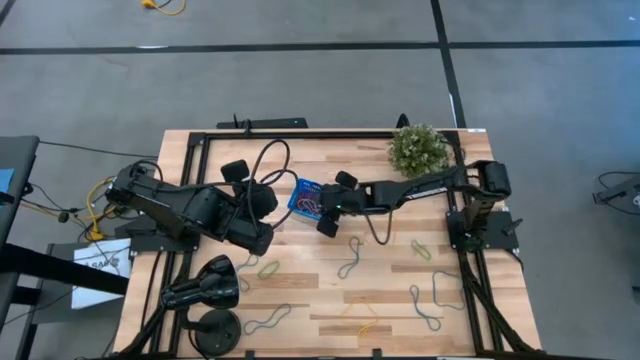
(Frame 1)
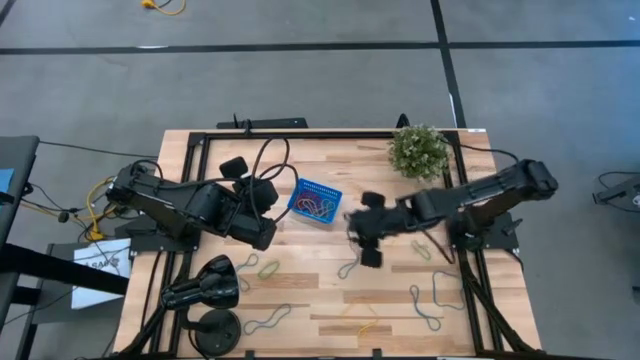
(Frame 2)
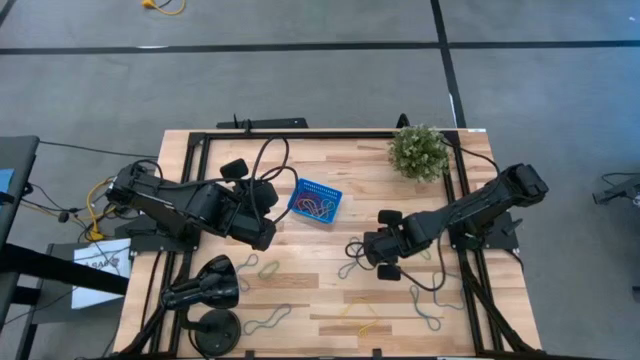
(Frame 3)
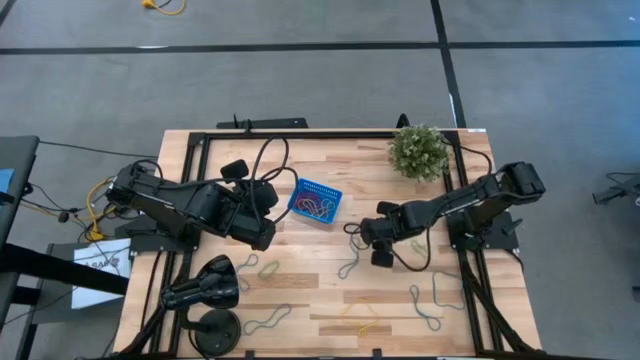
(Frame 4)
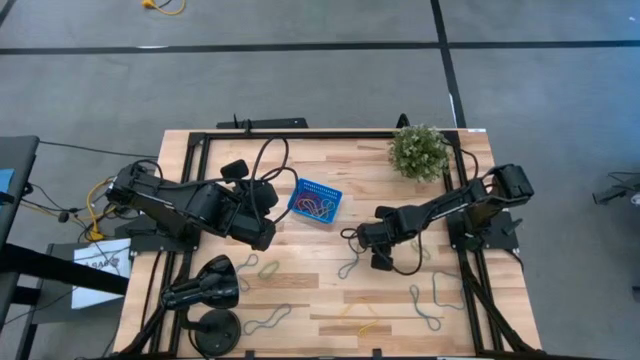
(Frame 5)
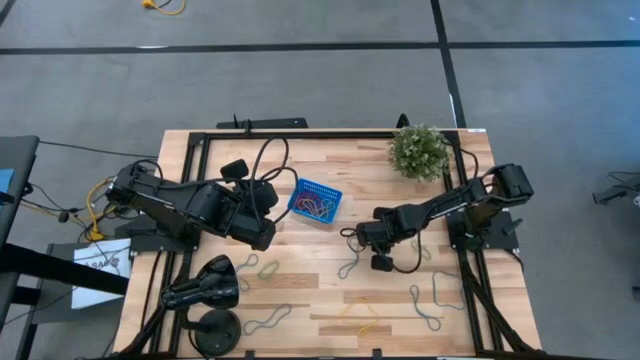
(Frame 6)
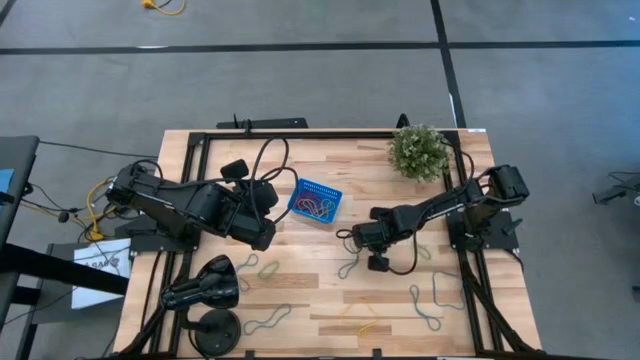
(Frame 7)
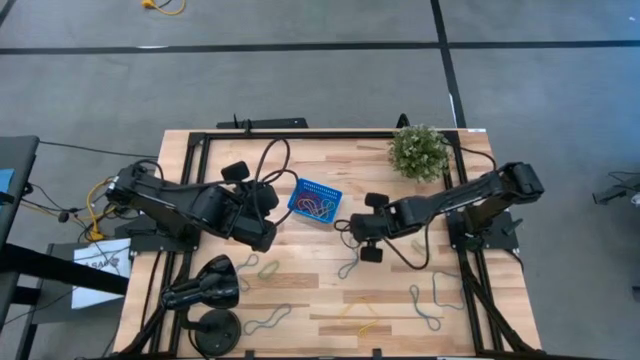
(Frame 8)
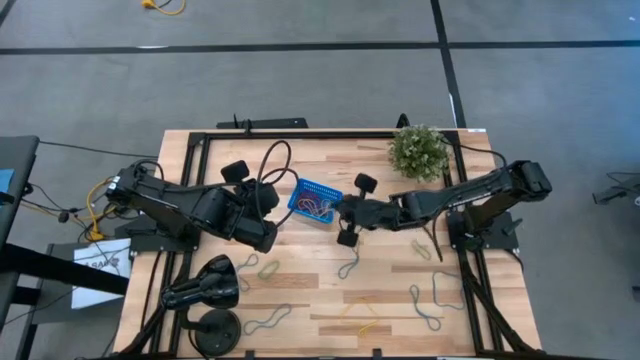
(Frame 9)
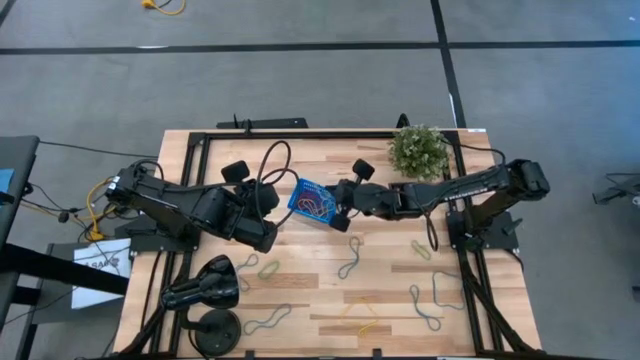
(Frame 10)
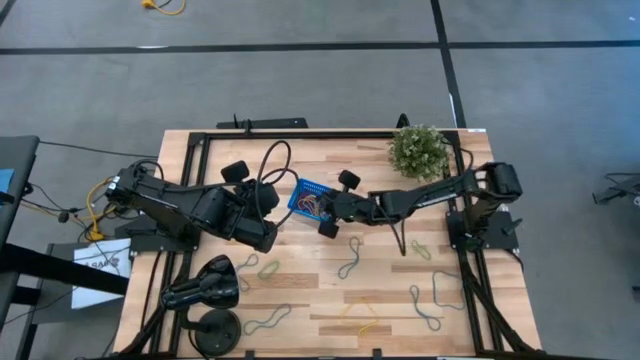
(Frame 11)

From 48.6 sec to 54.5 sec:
Task: Pick and place items into bin
Put the yellow rubber band into the blue bin

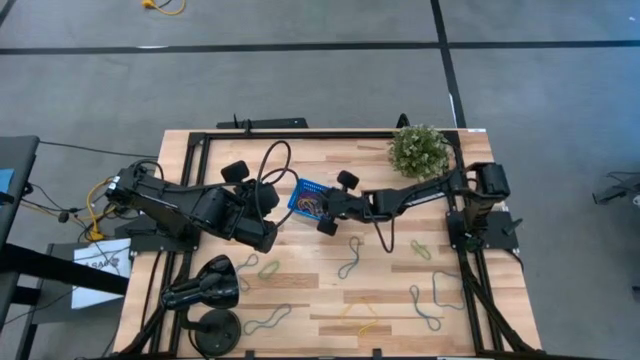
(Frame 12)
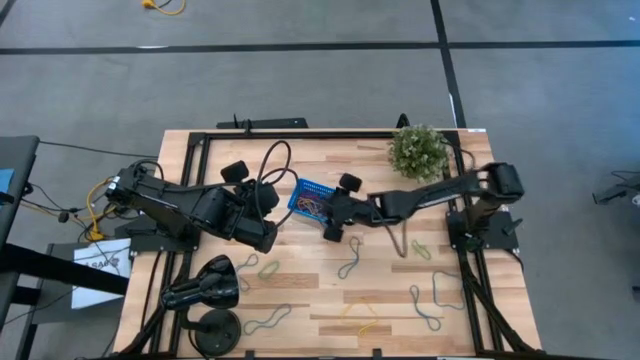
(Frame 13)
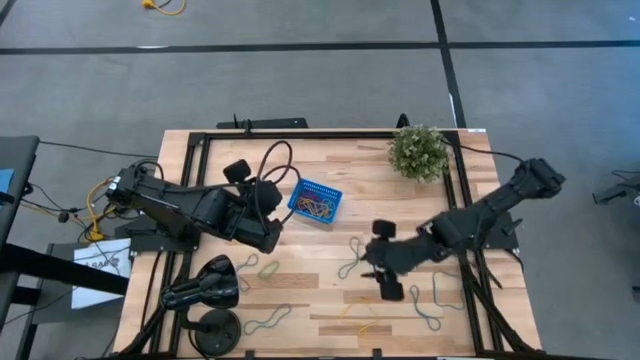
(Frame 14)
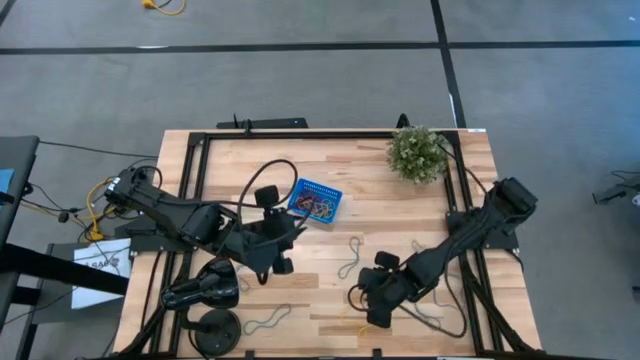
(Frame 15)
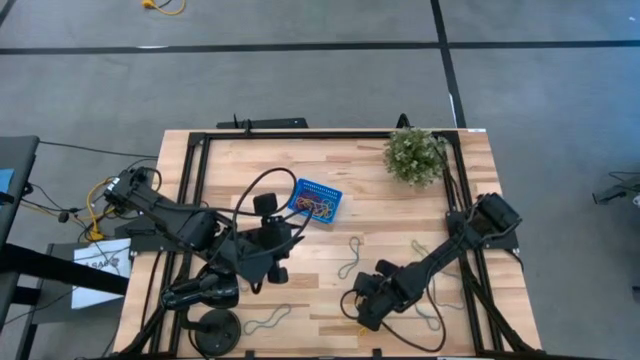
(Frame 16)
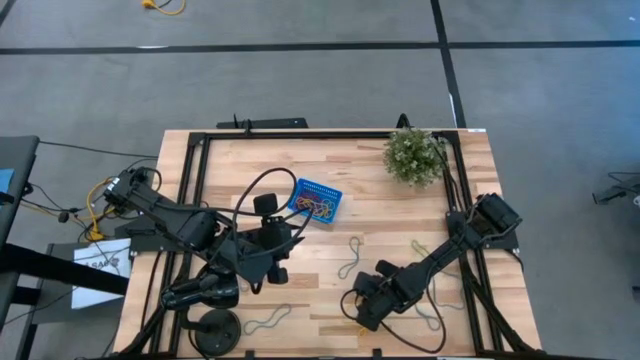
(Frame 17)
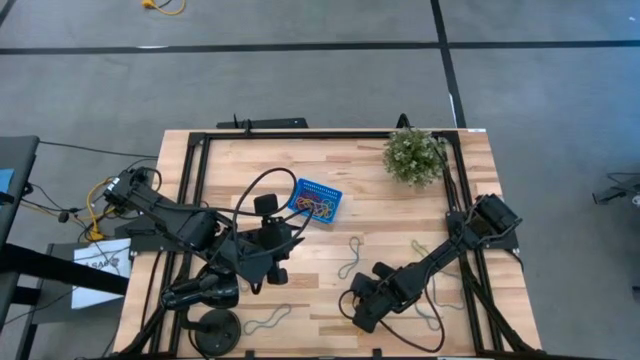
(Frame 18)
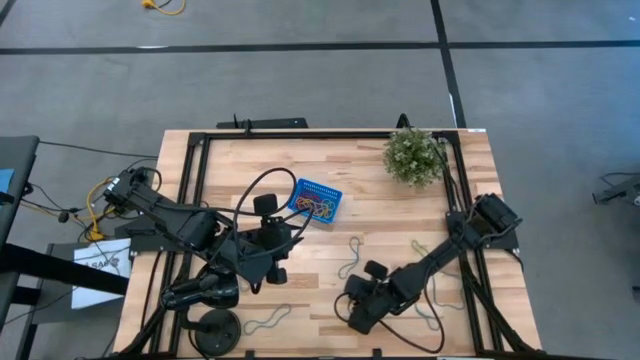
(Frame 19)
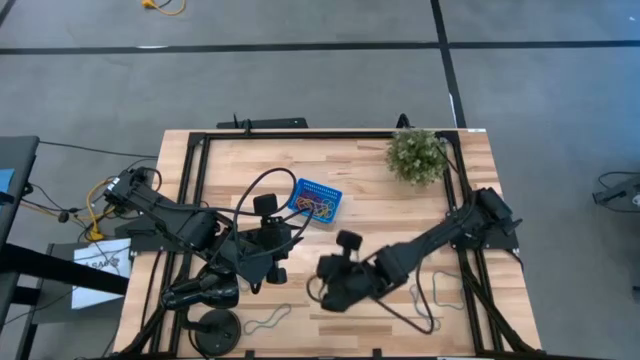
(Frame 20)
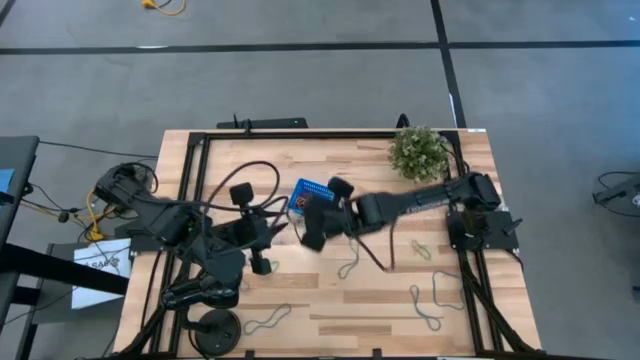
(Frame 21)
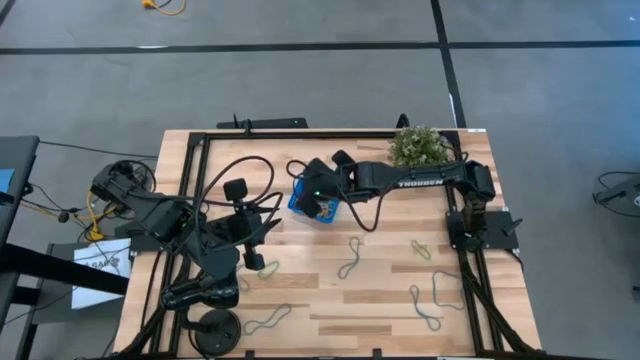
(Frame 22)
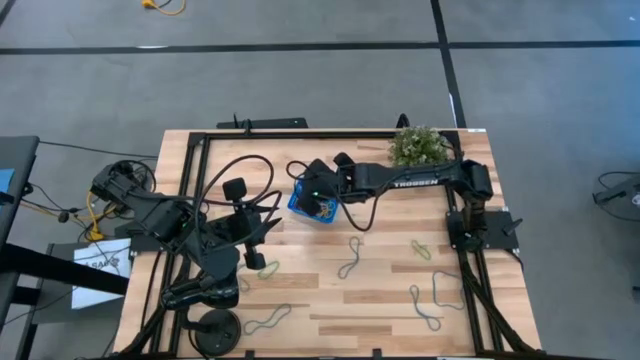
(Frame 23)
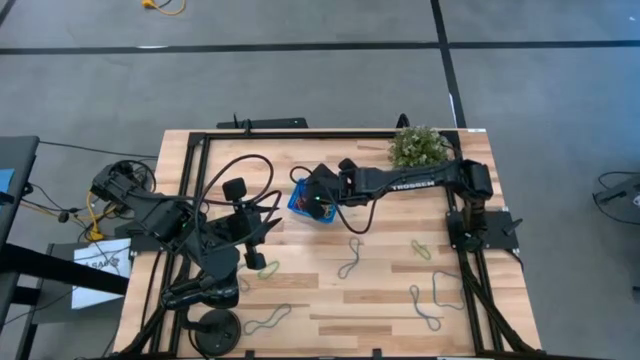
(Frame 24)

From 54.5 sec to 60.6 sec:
Put the yellow rubber band into the blue bin

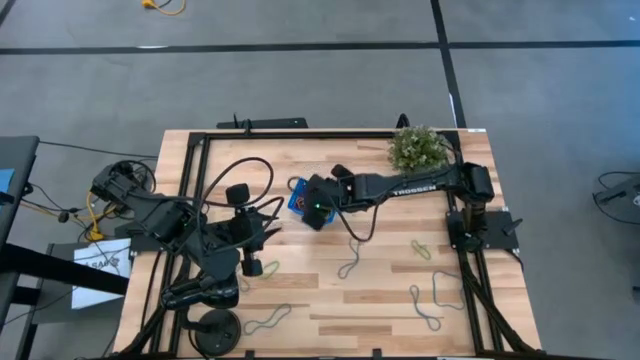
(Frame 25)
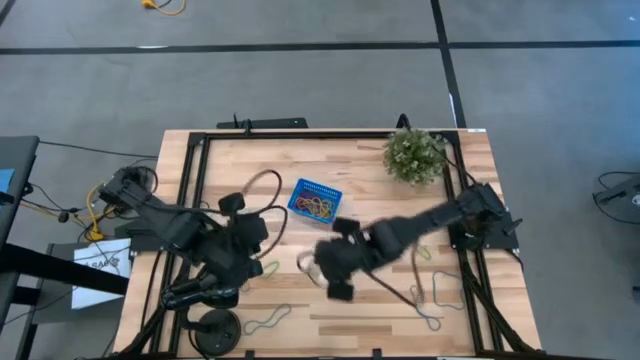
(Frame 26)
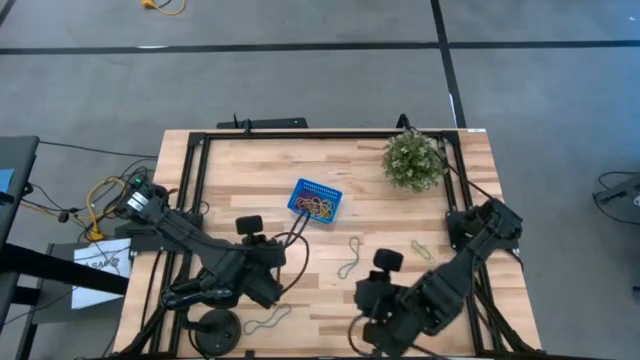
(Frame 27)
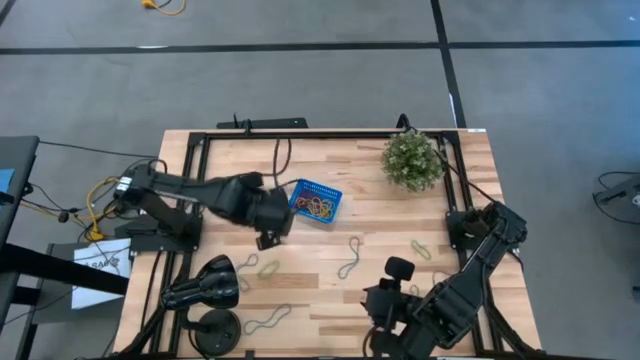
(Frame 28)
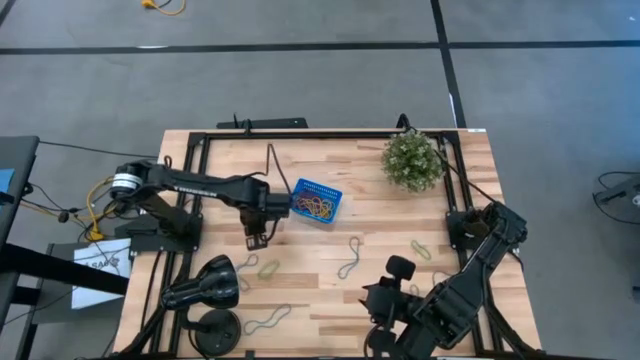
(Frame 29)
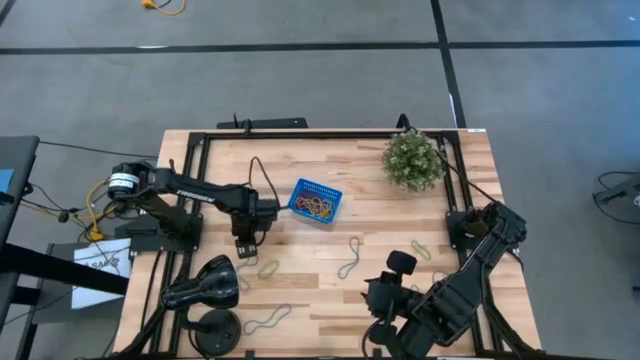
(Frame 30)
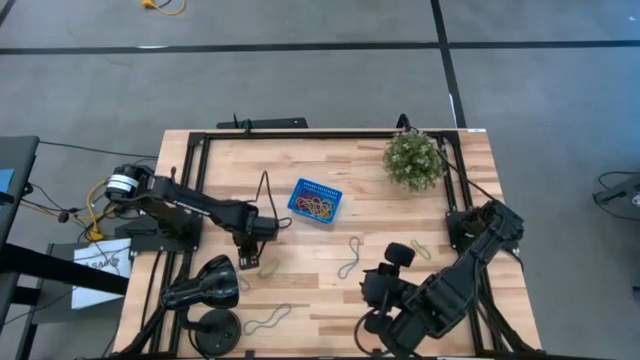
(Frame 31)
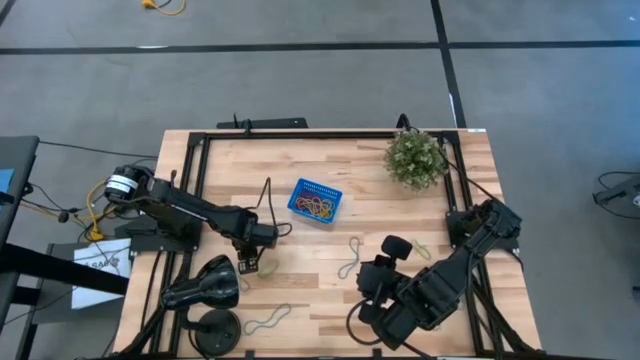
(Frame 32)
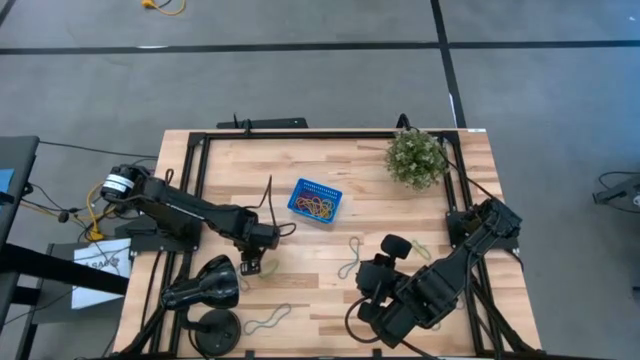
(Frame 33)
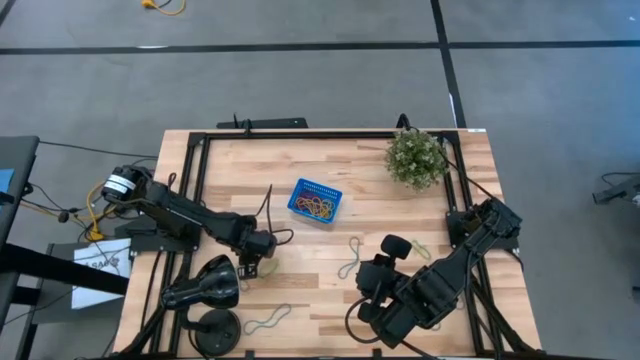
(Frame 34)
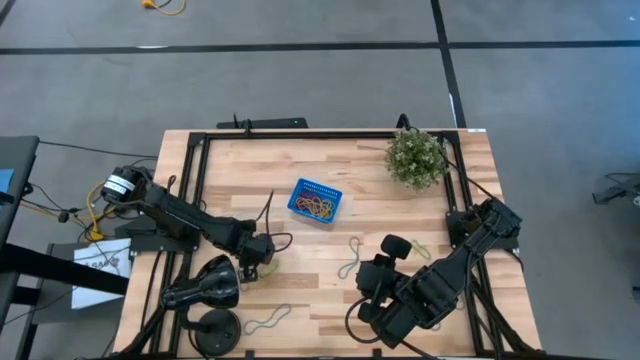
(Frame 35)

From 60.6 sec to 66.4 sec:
Put the blue rubber band into the blue bin

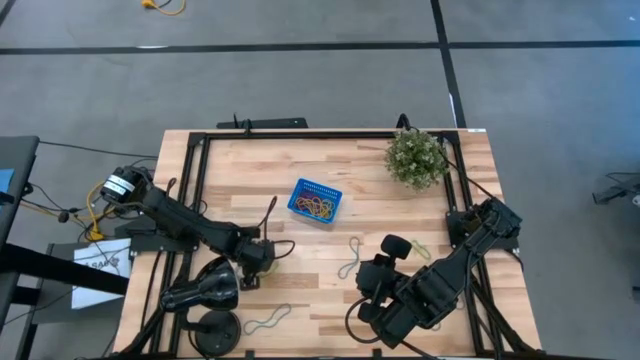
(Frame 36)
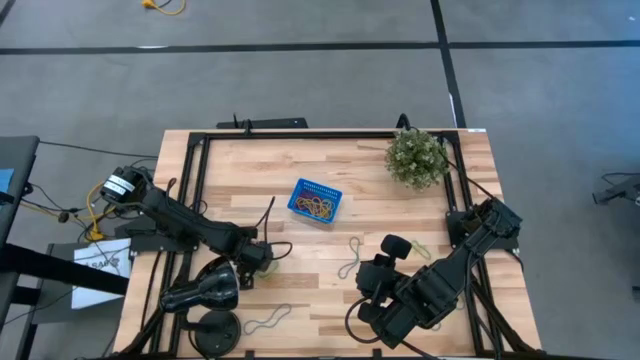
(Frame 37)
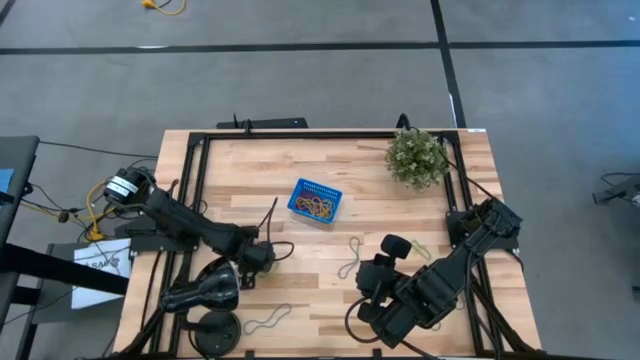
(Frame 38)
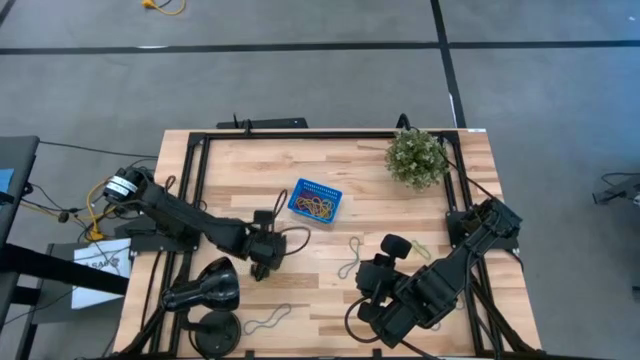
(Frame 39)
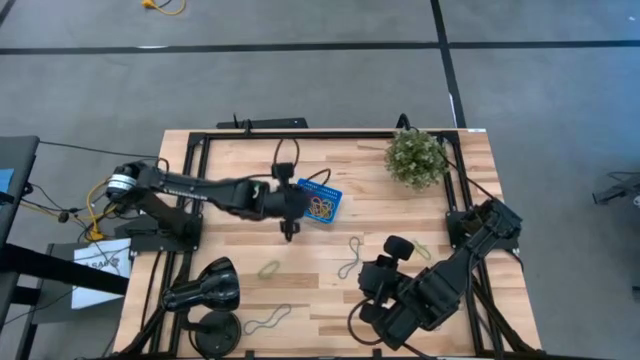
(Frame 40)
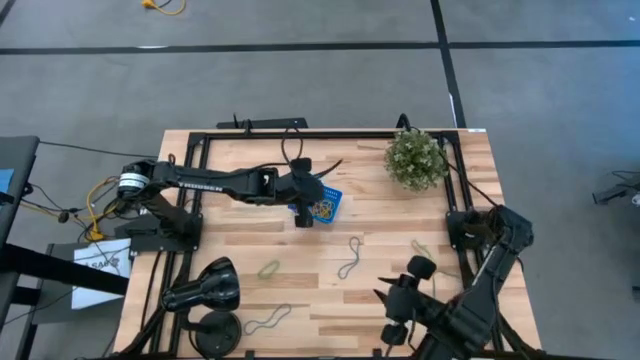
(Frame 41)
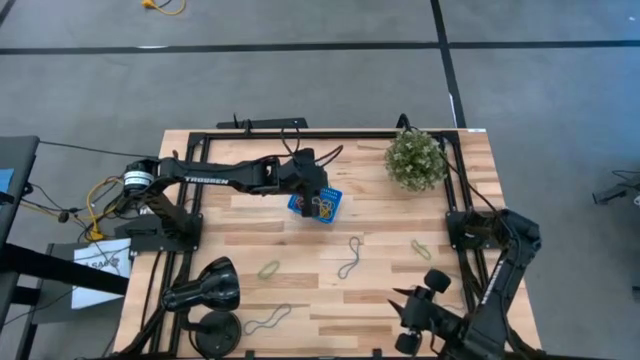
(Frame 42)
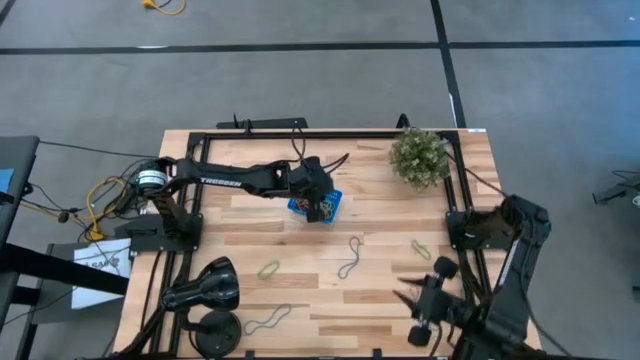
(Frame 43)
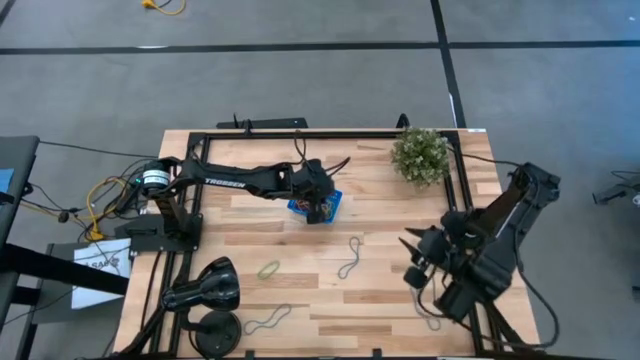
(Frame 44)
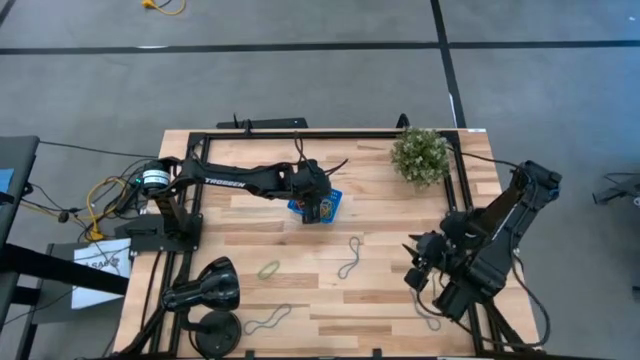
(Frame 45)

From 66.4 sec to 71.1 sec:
Put the blue rubber band into the blue bin
